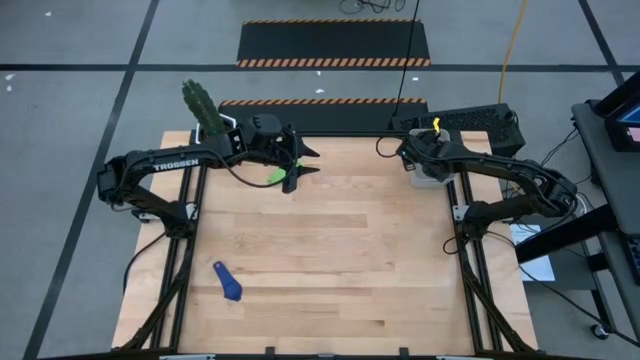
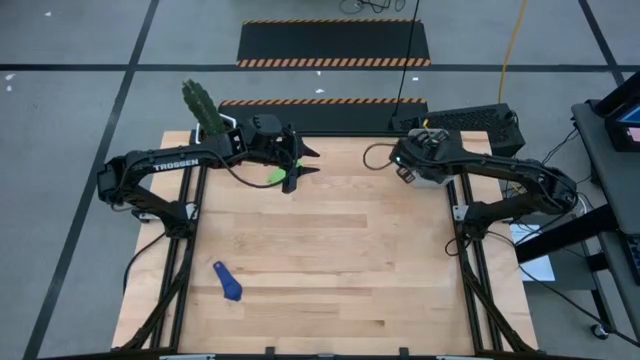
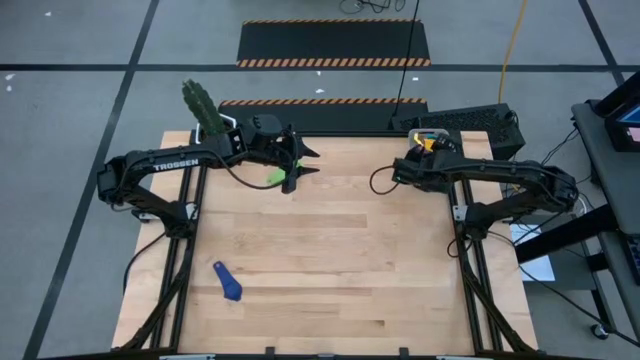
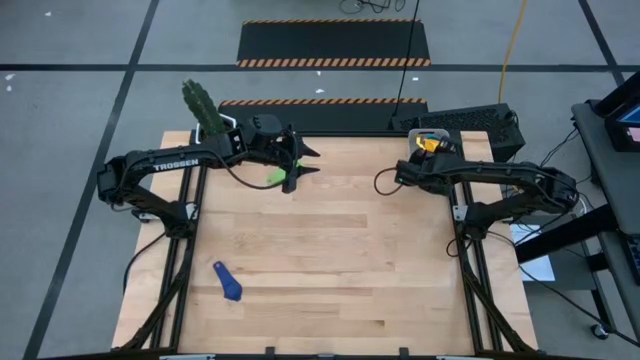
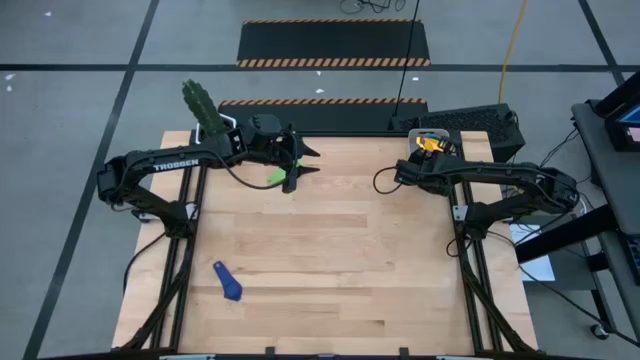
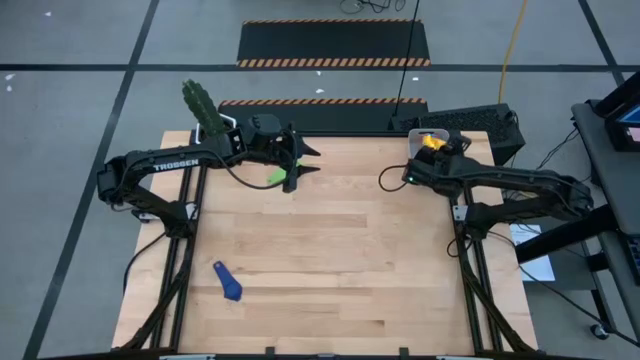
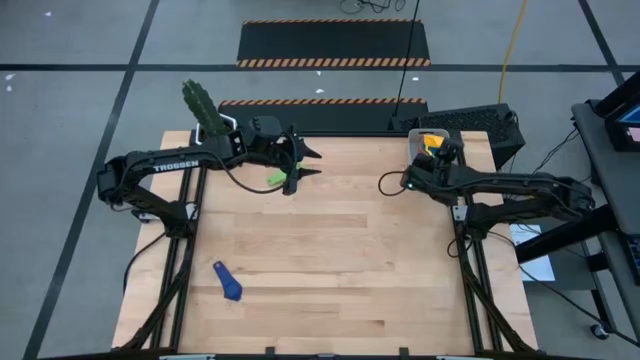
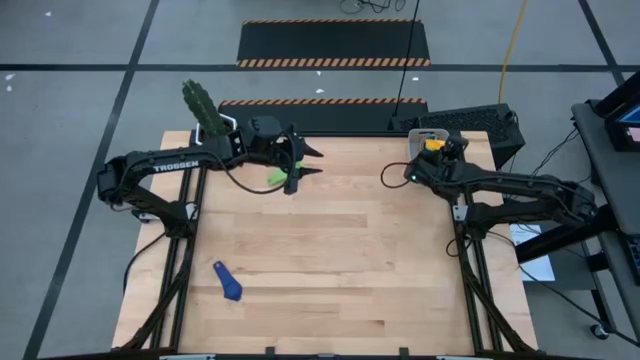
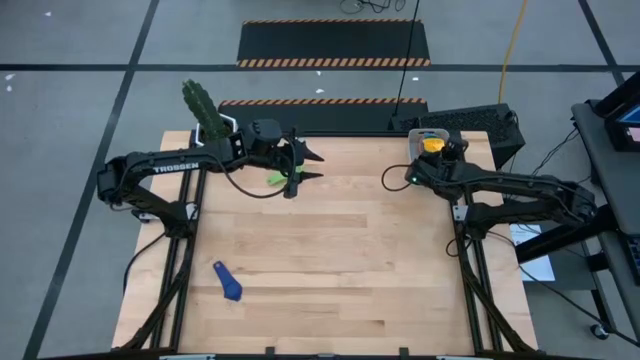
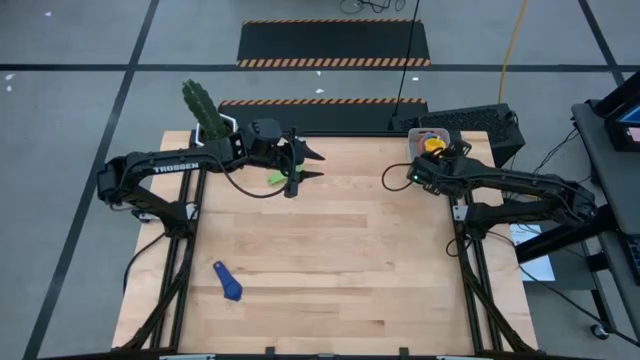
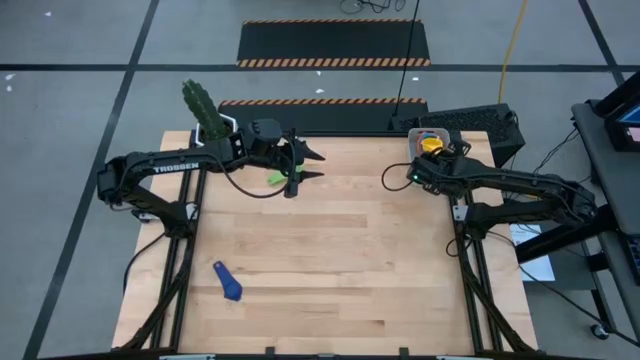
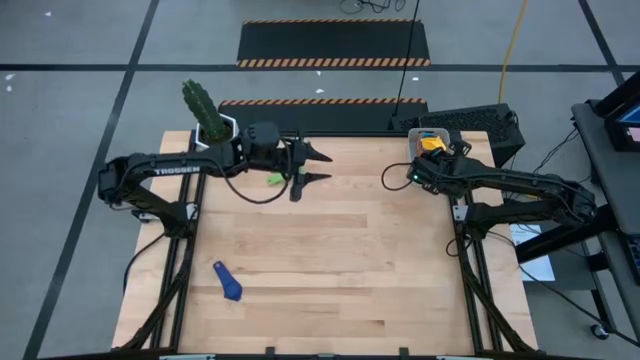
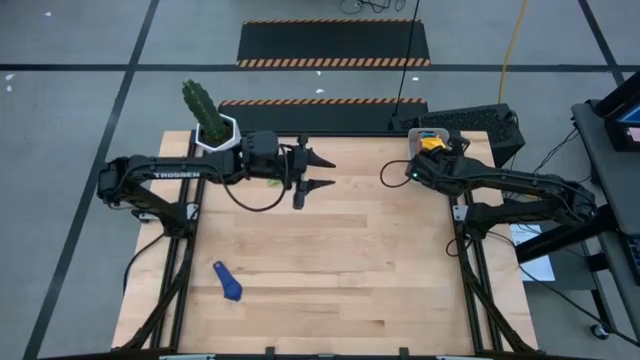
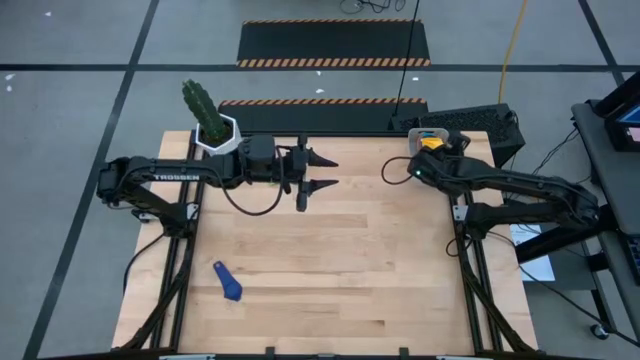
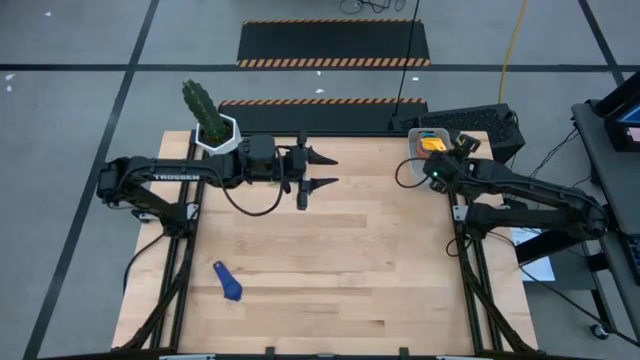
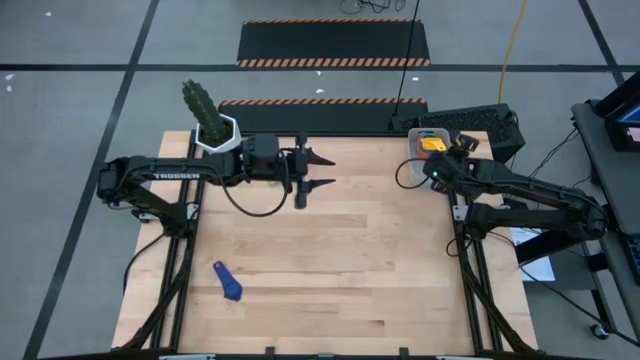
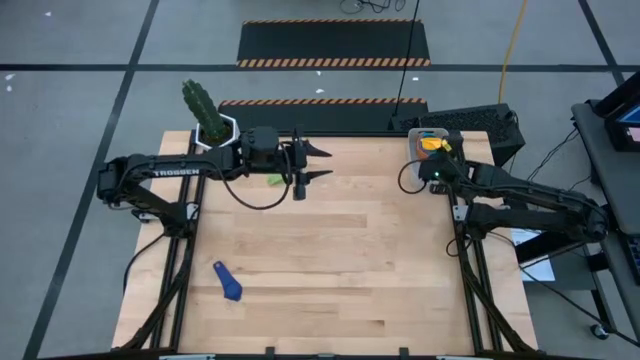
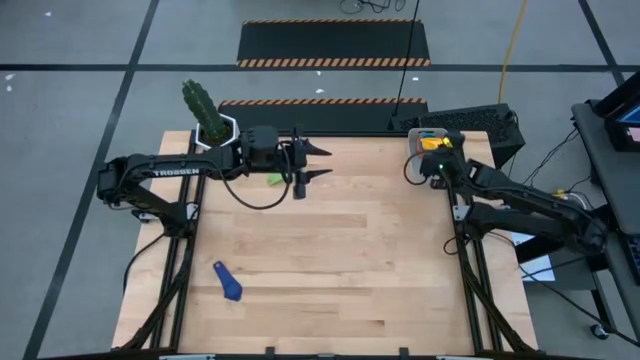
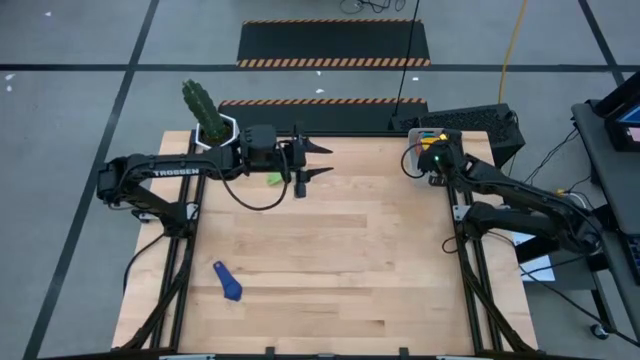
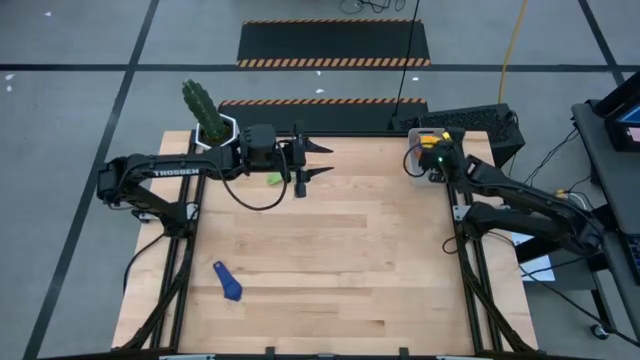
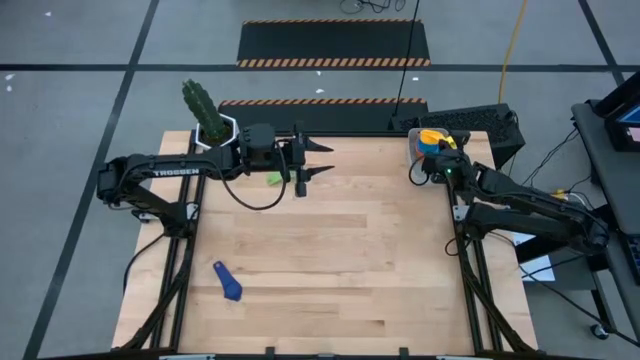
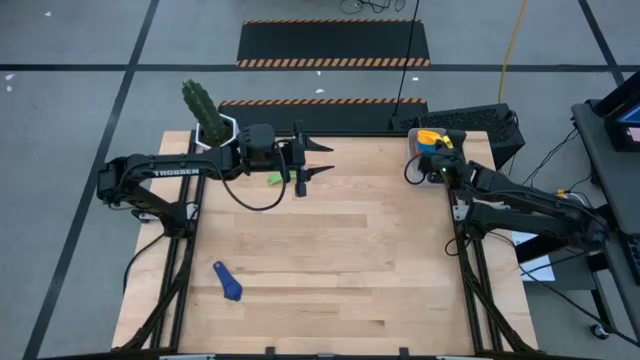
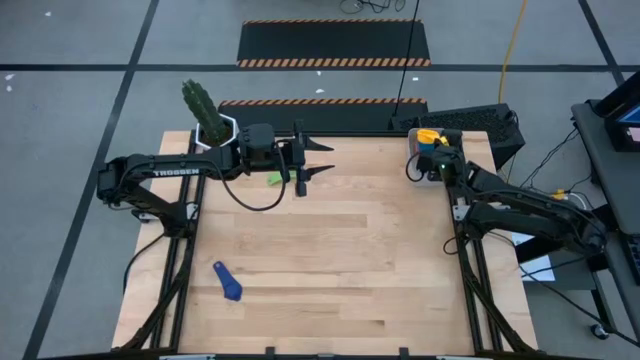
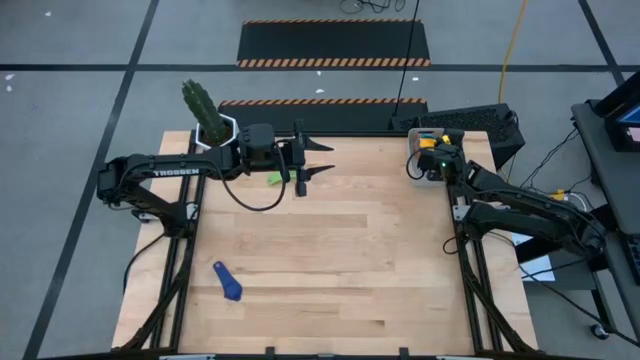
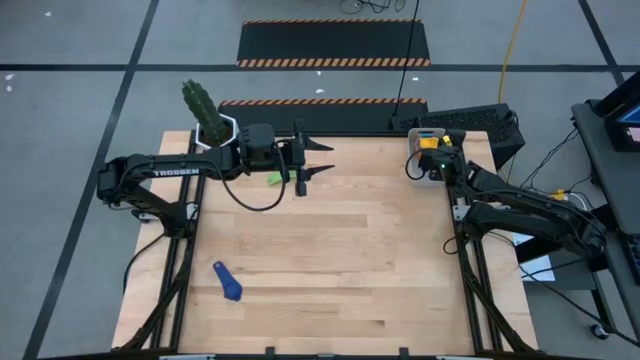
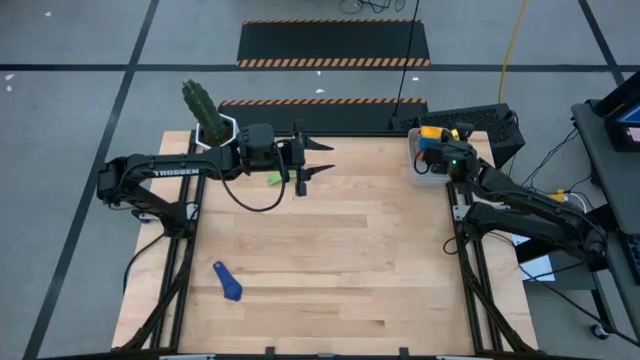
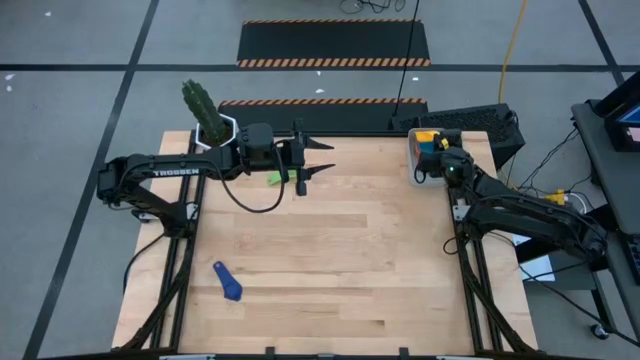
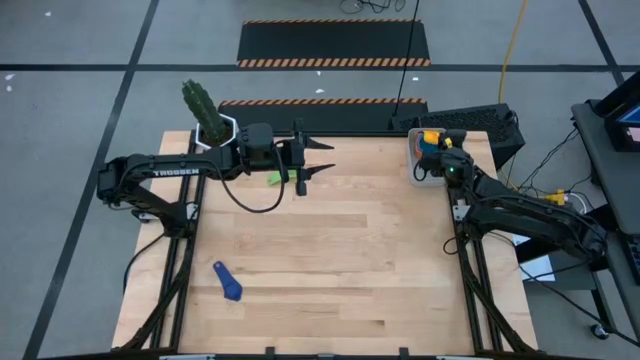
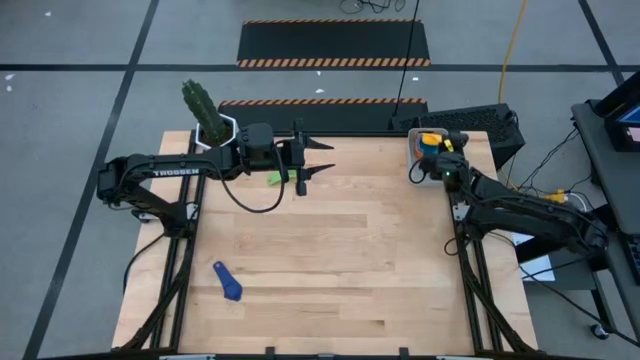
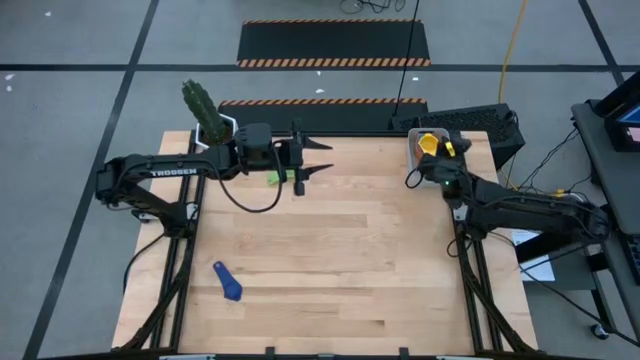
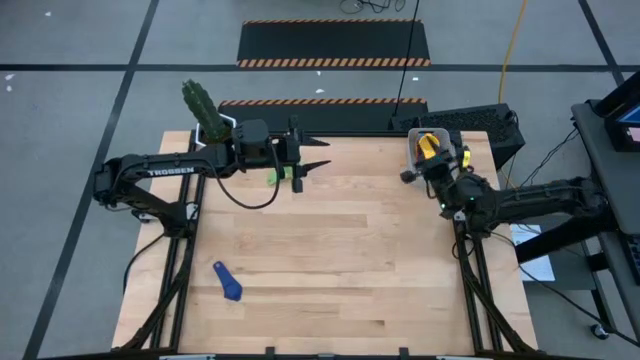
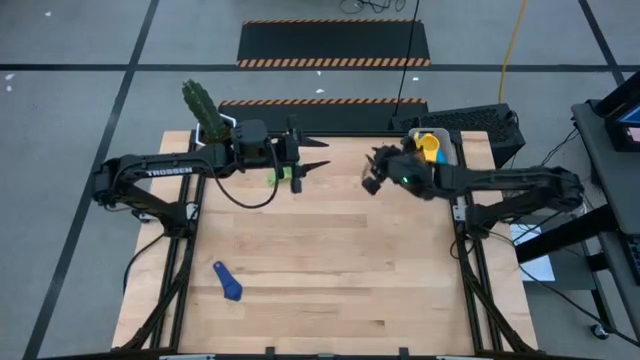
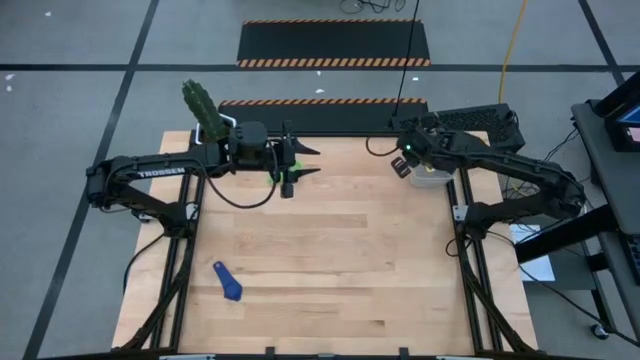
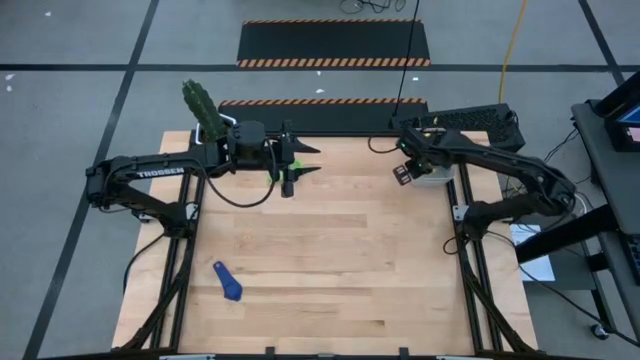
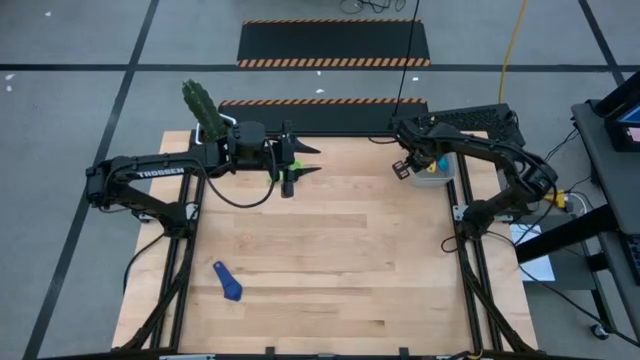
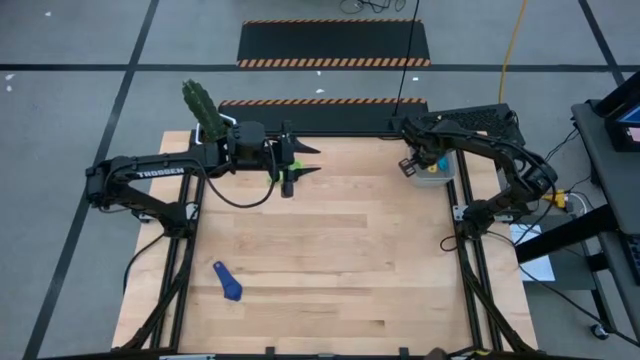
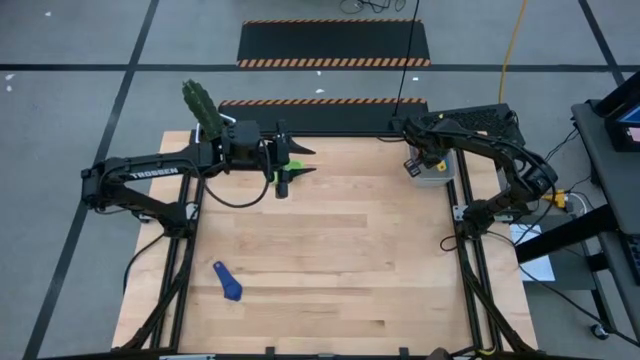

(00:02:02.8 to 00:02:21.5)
Task: Nest measuring cups in basket
Stack the yellow measuring cup on top of the light blue measuring cup in the gray bin

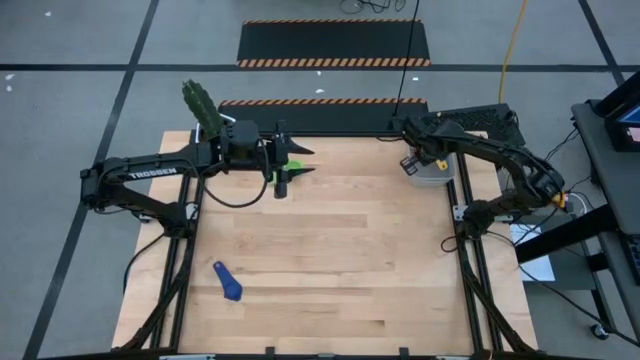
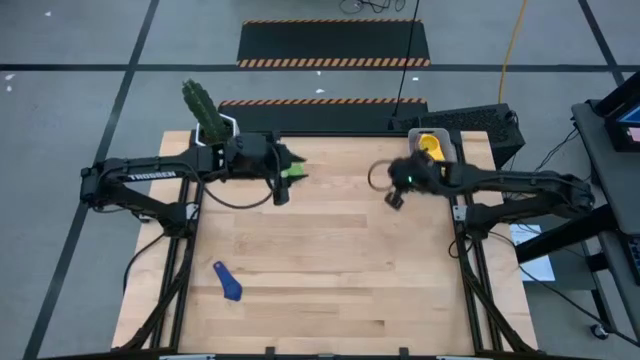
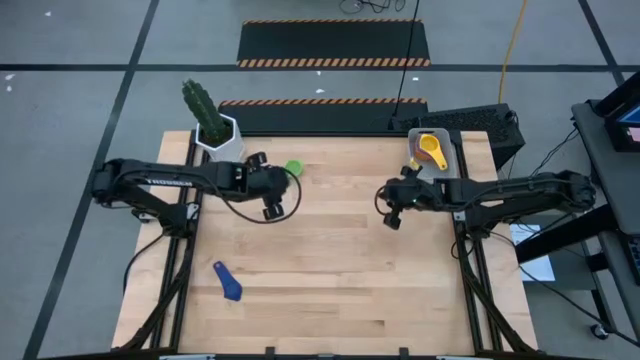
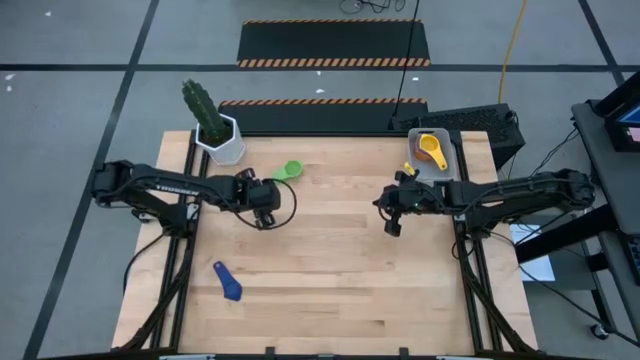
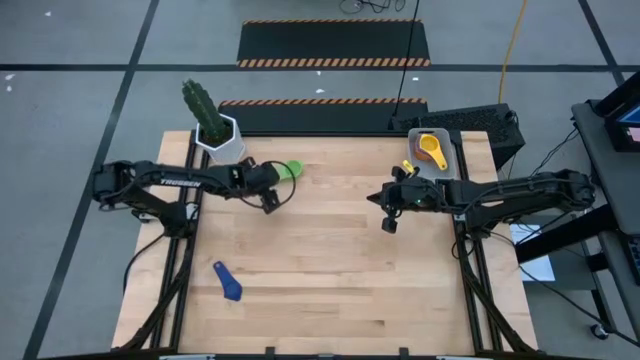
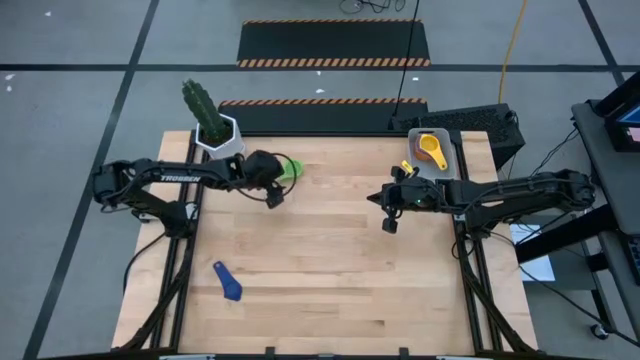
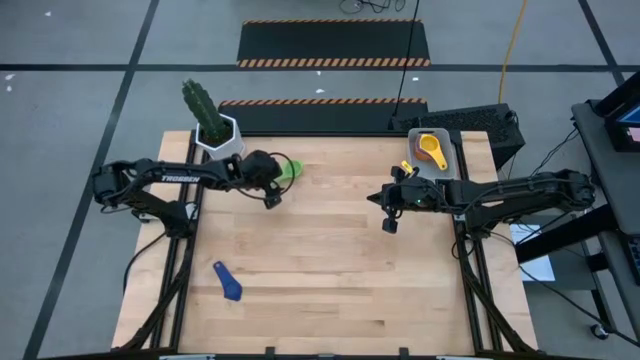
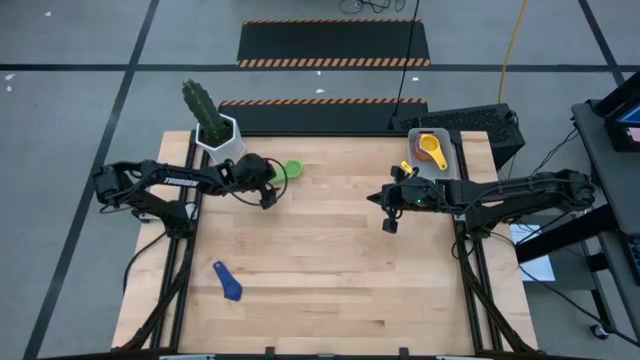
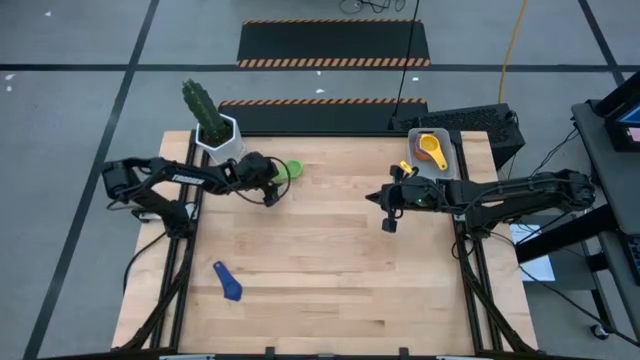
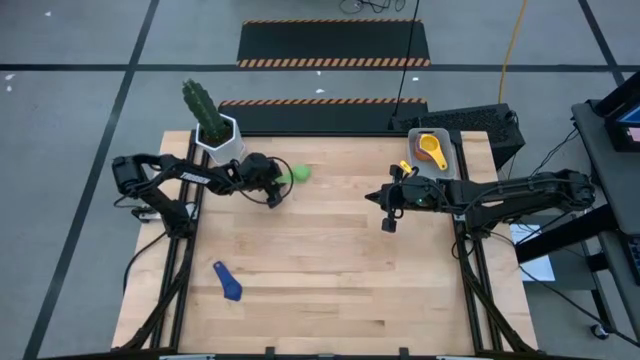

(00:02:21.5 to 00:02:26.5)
Stack the green measuring cup on top of the yellow measuring cup in the gray bin
